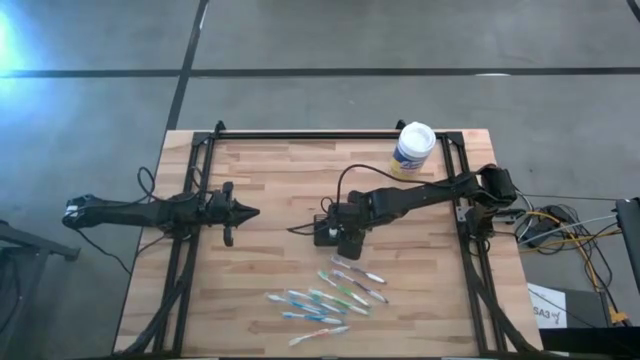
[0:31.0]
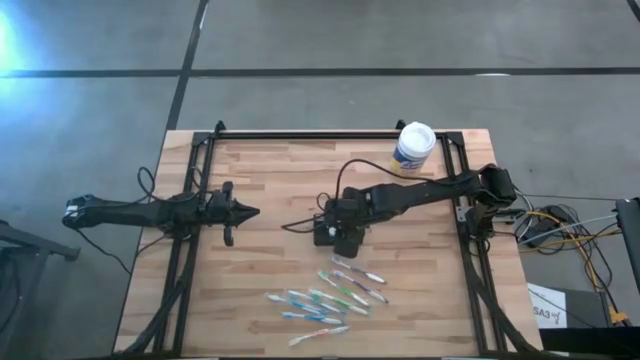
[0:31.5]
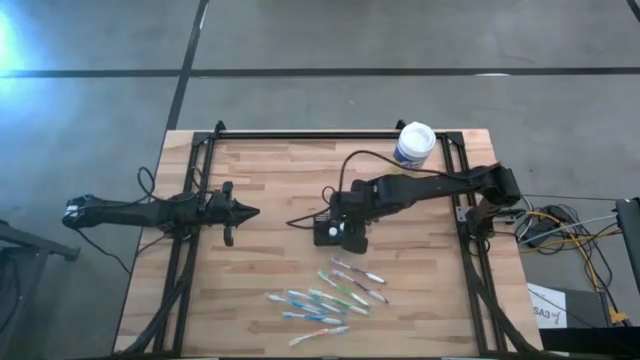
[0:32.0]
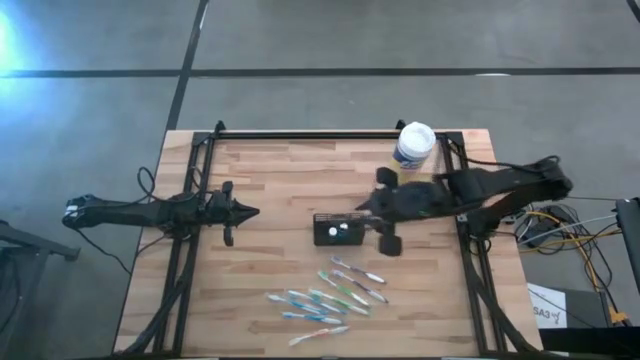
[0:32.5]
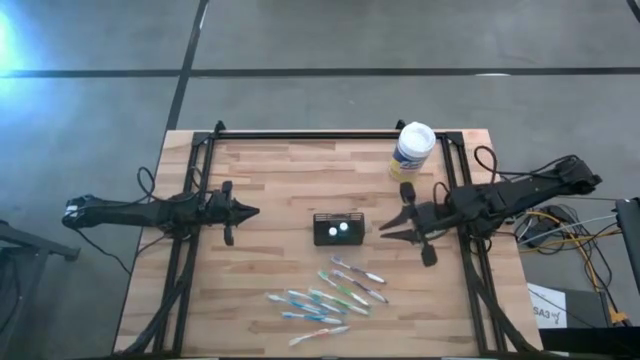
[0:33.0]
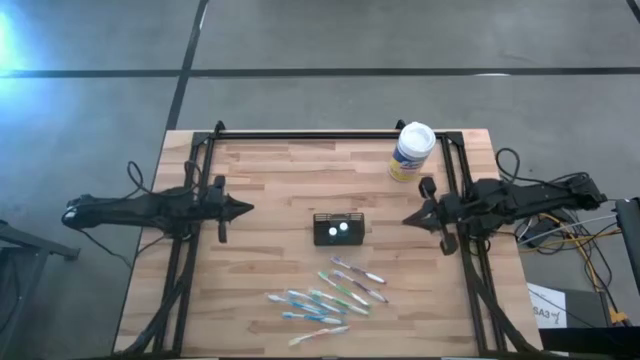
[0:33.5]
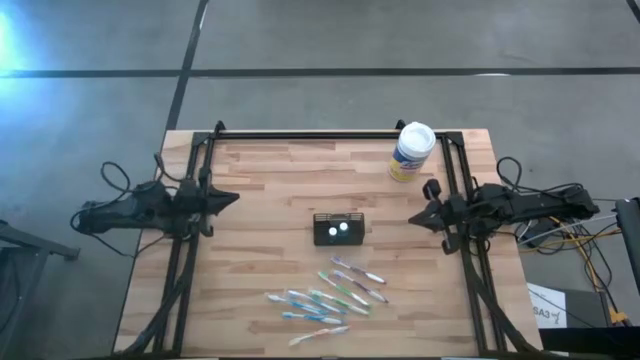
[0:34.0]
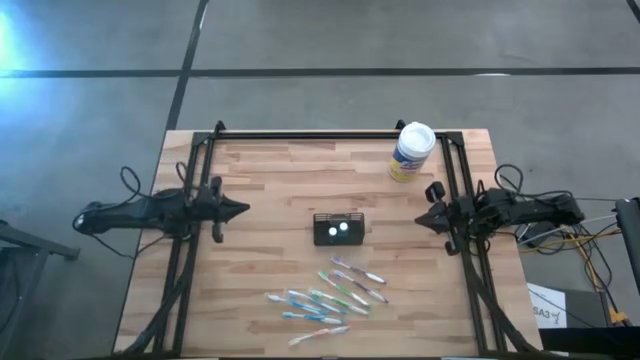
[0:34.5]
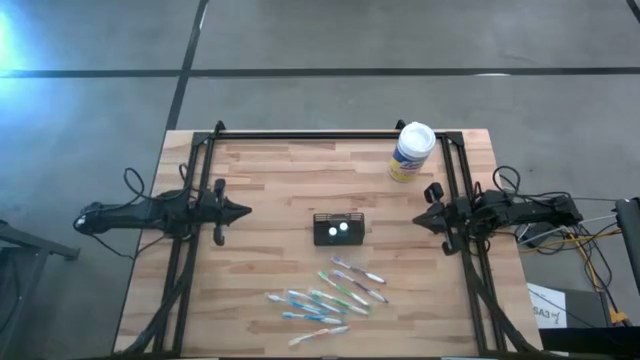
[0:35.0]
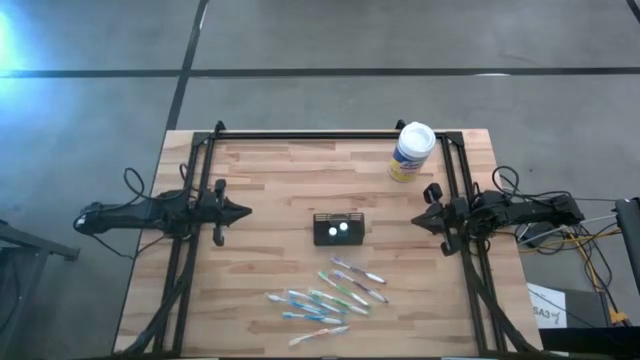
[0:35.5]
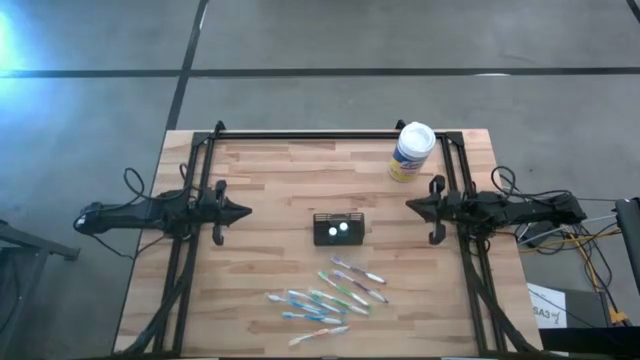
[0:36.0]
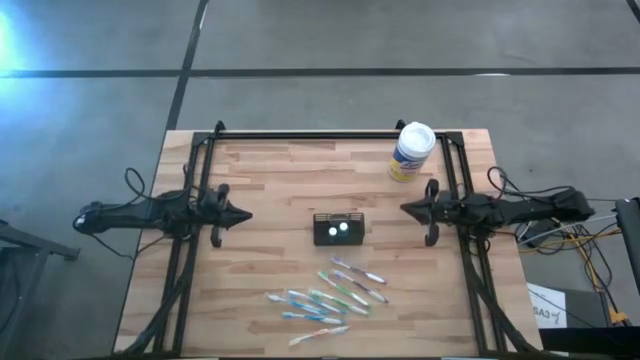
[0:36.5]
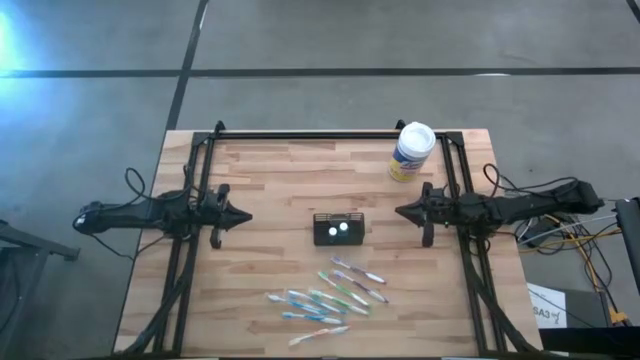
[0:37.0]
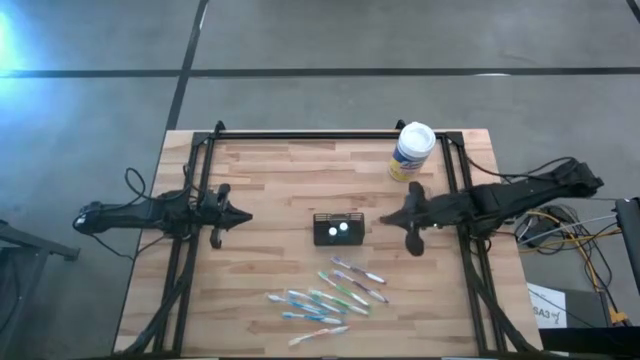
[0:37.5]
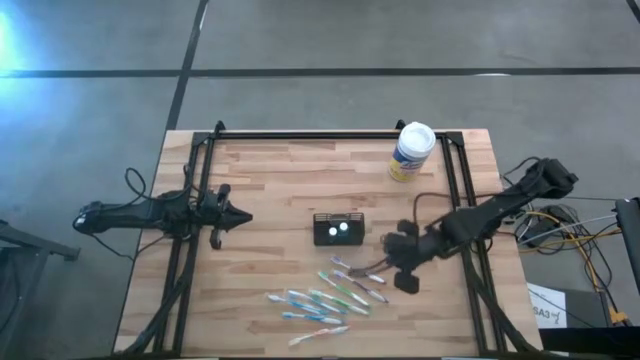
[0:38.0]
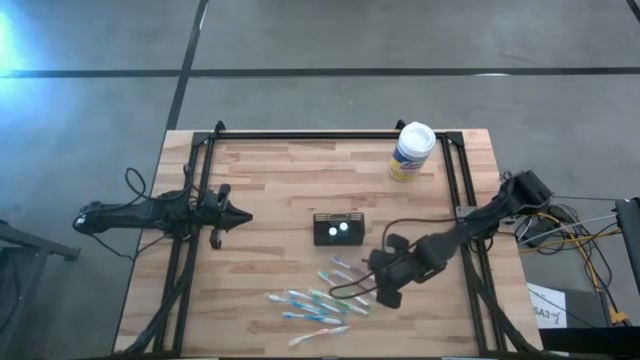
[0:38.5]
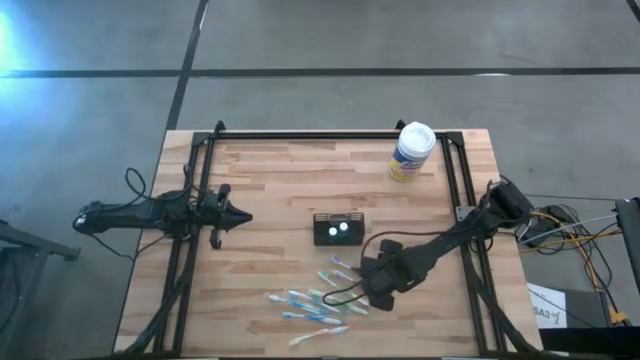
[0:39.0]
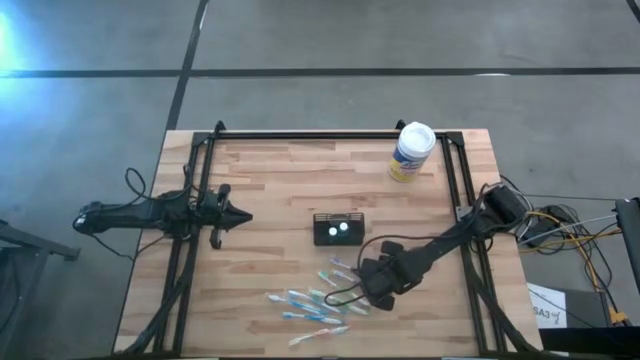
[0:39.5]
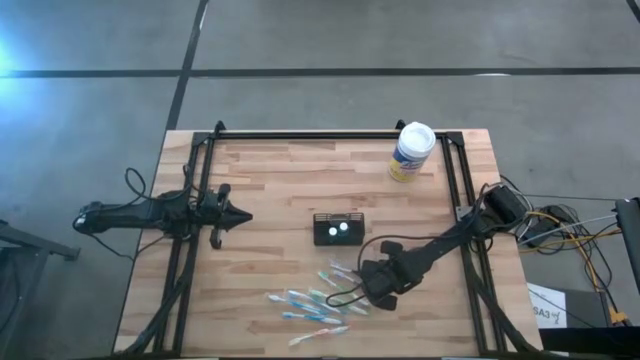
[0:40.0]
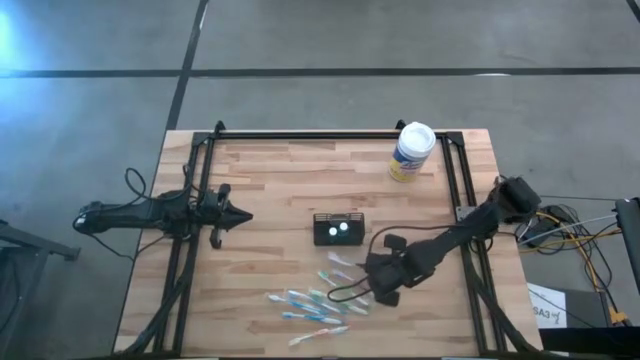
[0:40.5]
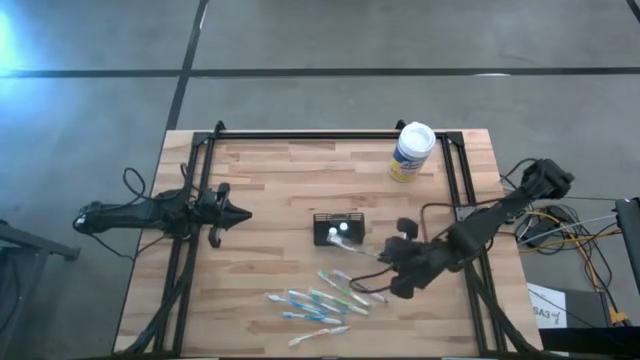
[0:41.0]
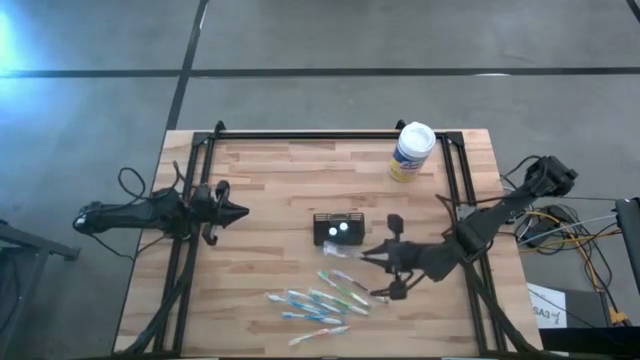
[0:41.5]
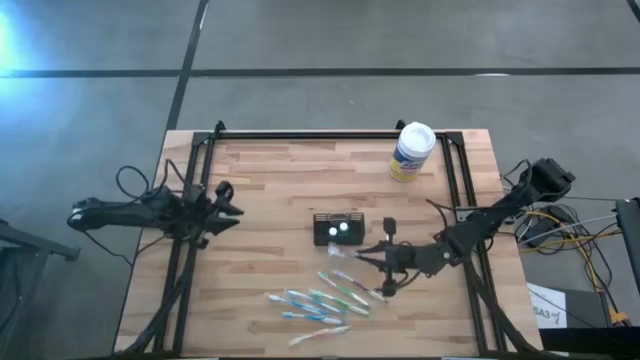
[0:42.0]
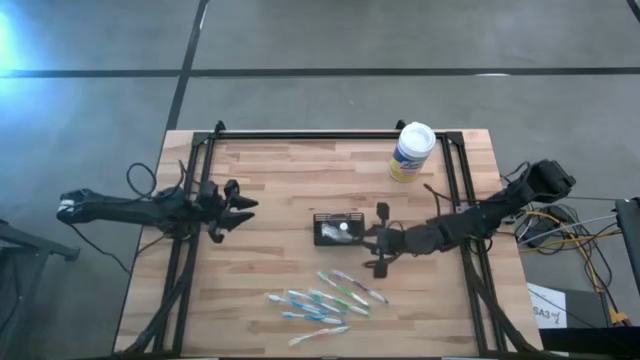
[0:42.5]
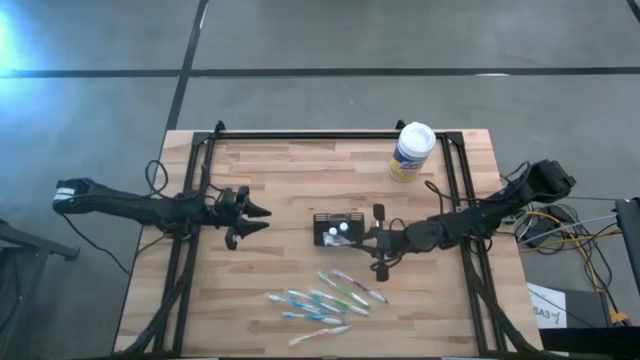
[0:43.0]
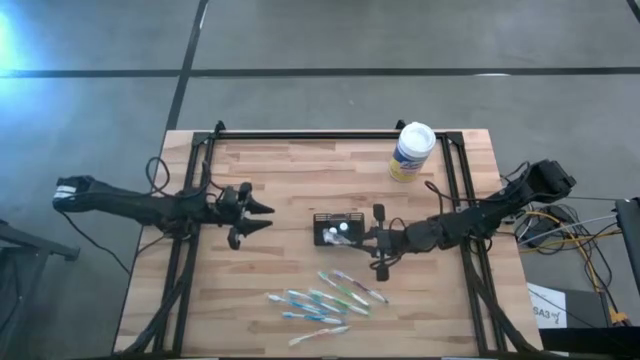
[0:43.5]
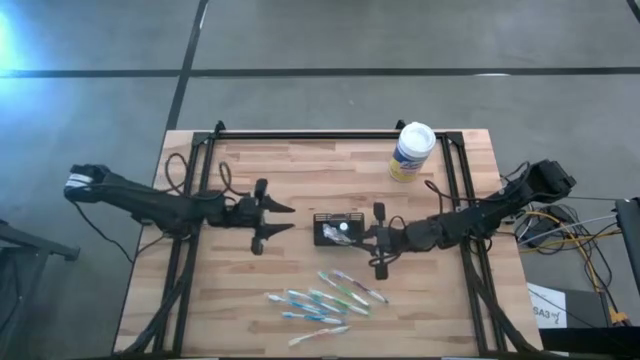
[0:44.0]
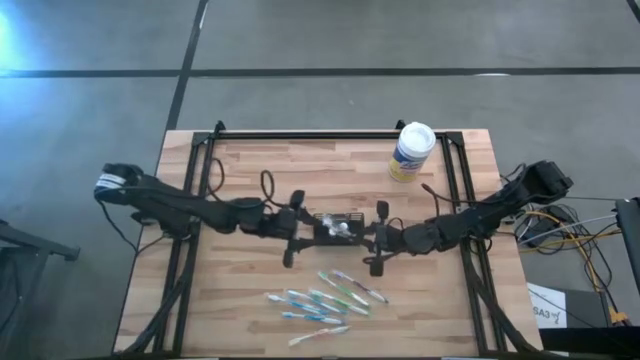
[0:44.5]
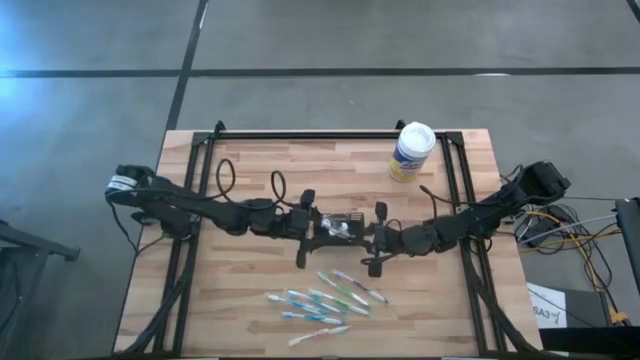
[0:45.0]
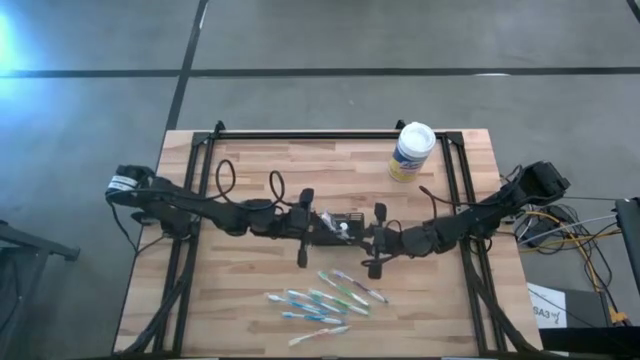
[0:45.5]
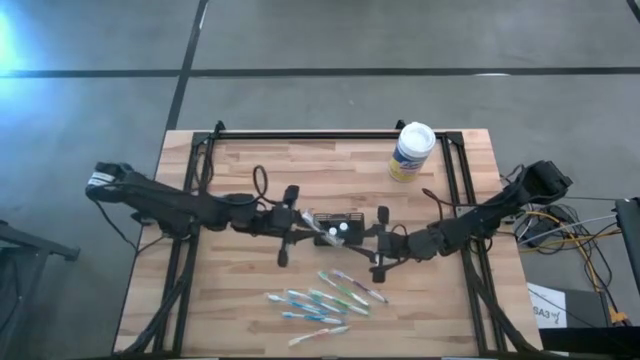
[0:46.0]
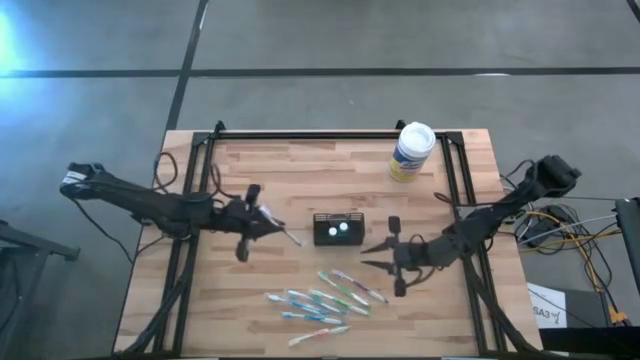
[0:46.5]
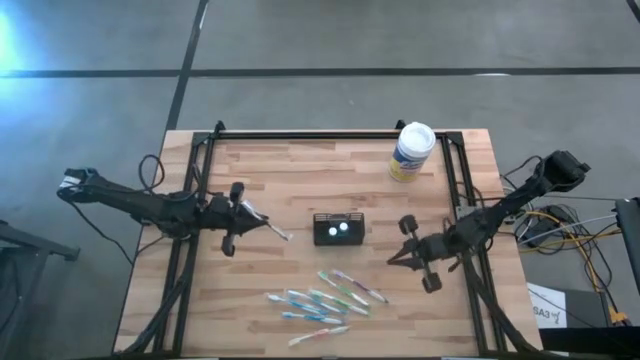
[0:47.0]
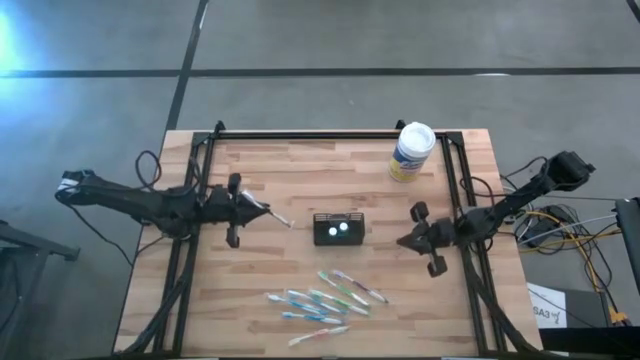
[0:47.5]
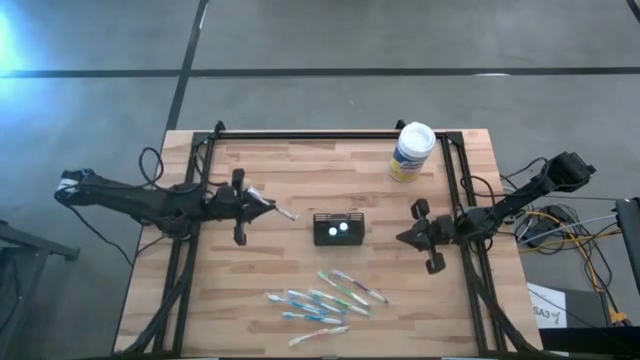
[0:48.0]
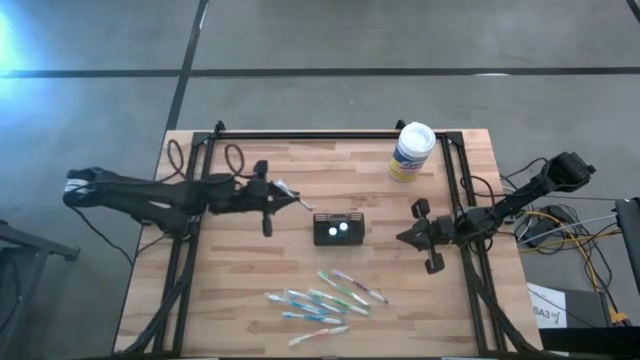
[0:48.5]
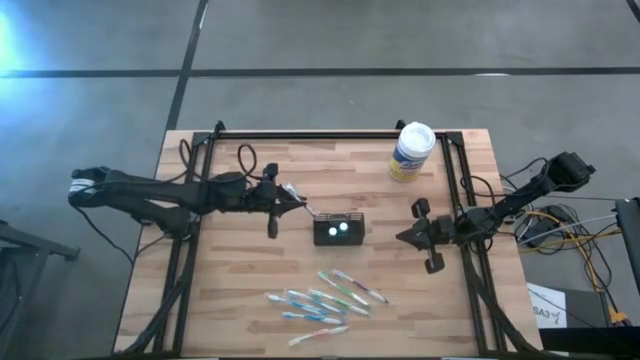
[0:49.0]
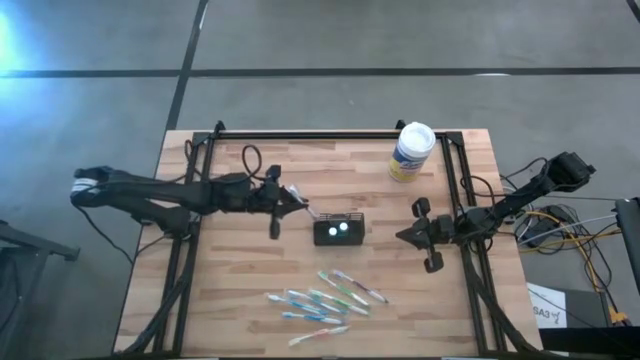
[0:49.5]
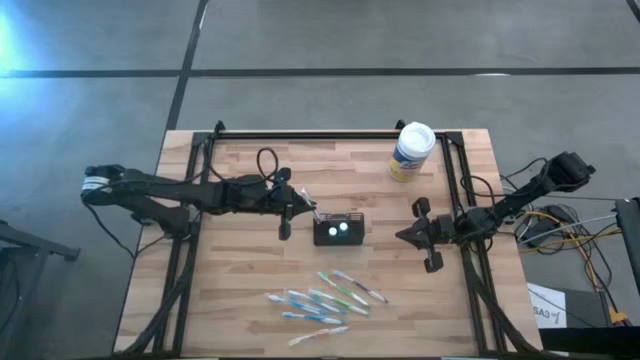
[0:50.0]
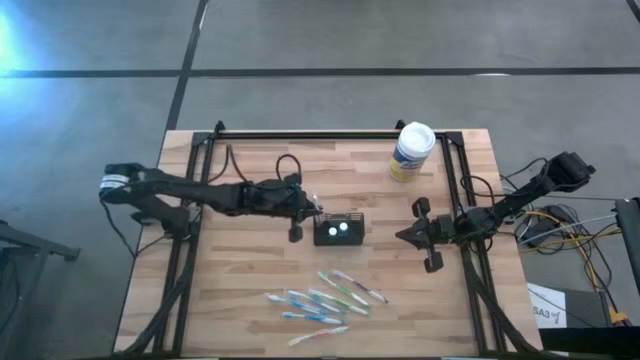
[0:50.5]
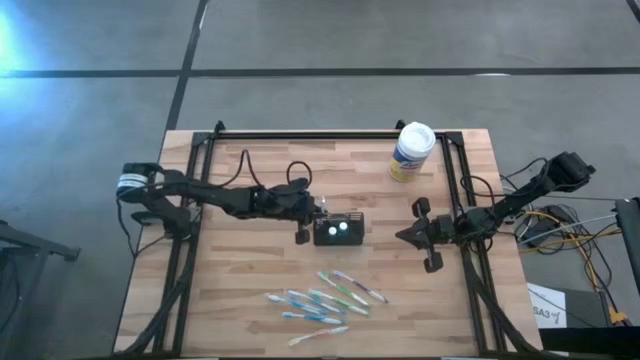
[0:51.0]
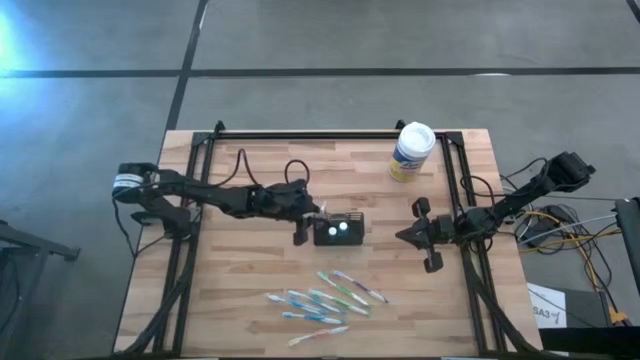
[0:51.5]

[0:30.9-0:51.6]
Task: Pick & Place toothbrushing station
Put the top violet toothbrush into the mesh organizer
